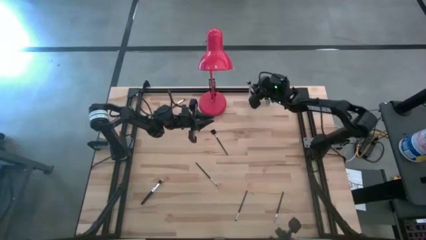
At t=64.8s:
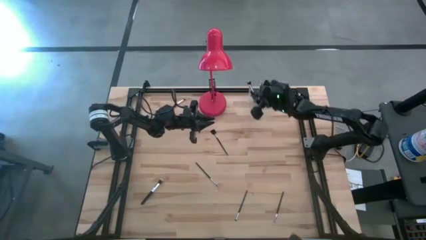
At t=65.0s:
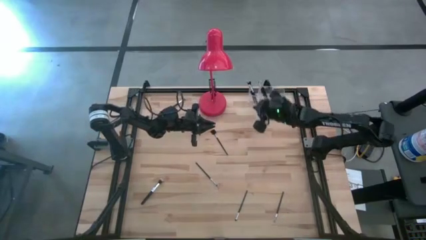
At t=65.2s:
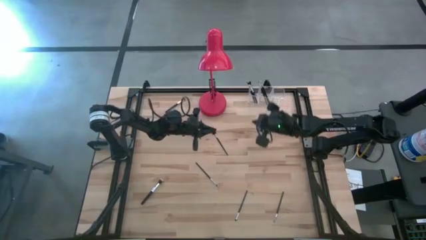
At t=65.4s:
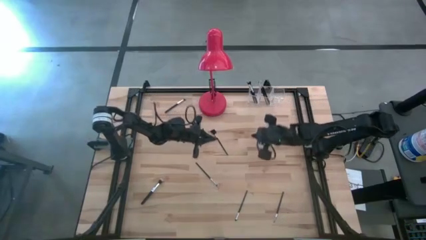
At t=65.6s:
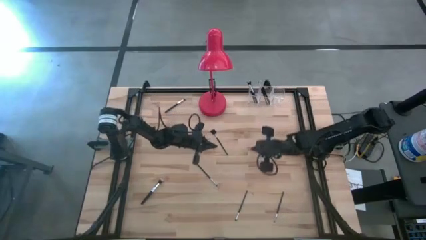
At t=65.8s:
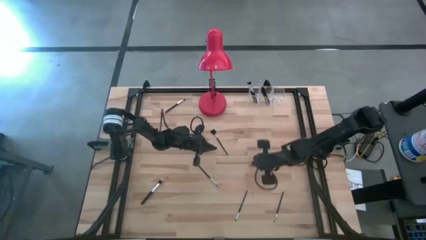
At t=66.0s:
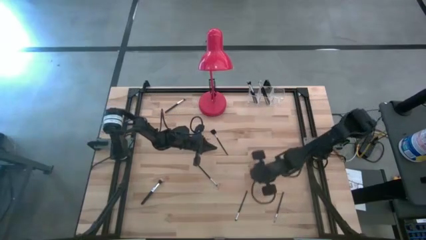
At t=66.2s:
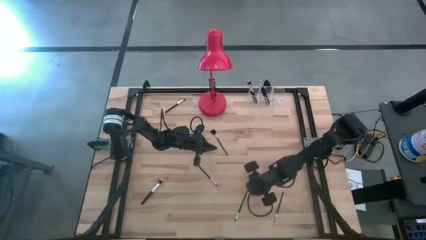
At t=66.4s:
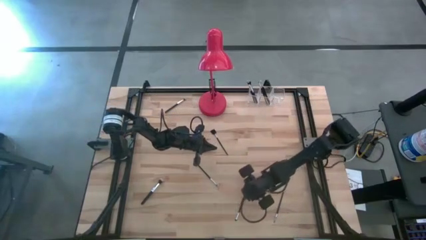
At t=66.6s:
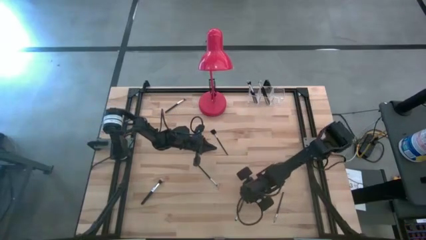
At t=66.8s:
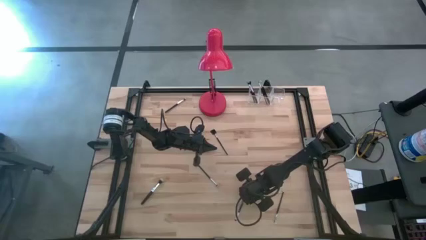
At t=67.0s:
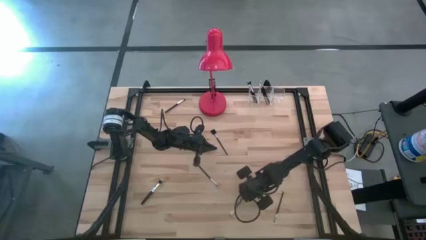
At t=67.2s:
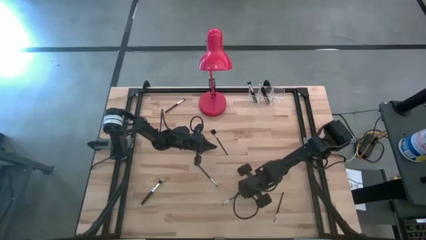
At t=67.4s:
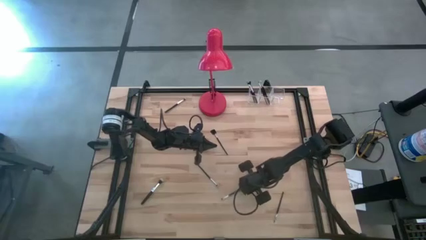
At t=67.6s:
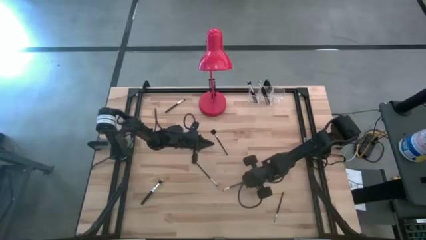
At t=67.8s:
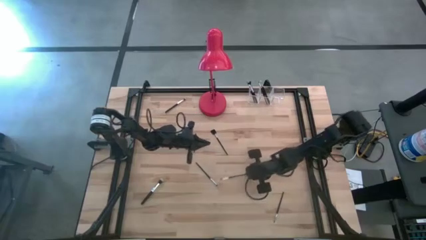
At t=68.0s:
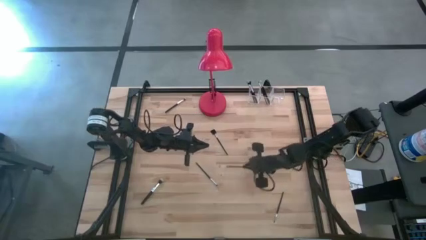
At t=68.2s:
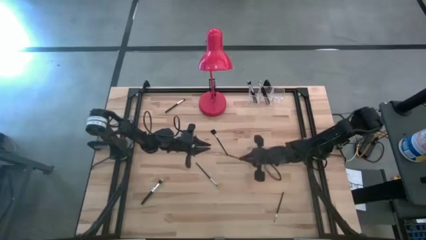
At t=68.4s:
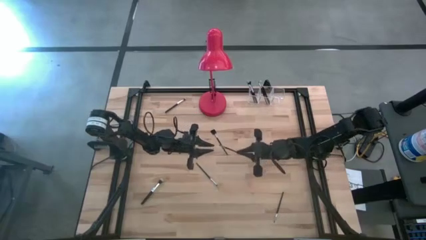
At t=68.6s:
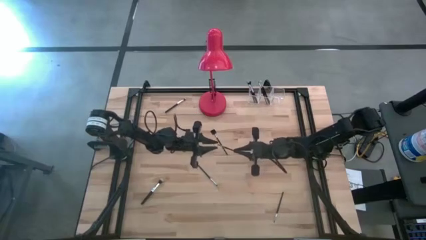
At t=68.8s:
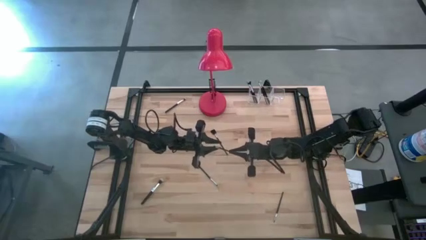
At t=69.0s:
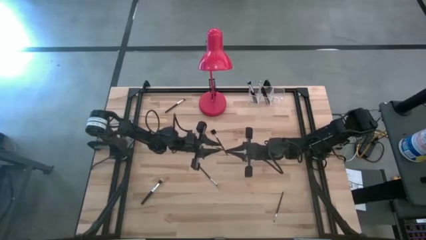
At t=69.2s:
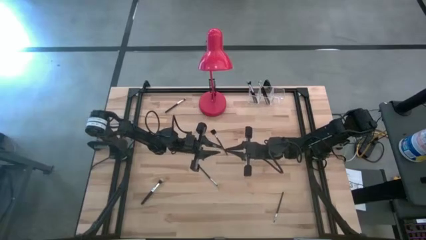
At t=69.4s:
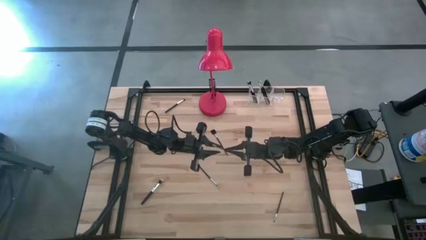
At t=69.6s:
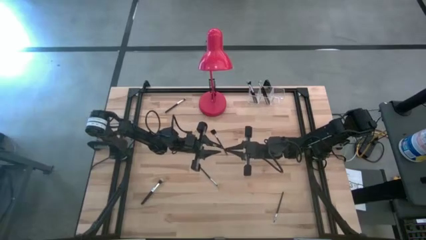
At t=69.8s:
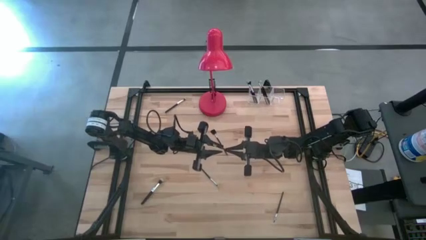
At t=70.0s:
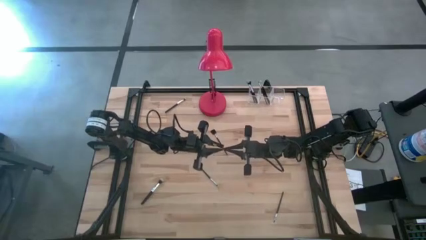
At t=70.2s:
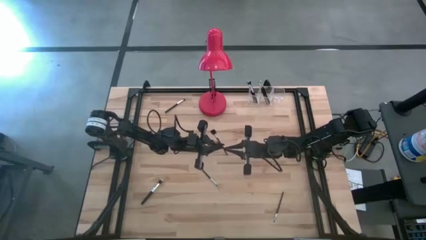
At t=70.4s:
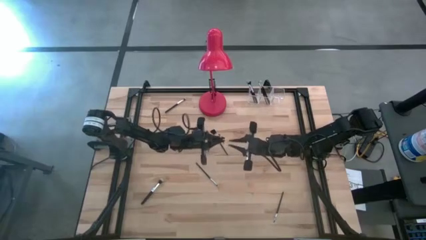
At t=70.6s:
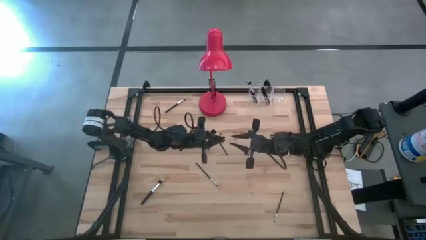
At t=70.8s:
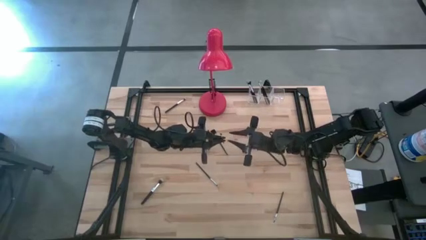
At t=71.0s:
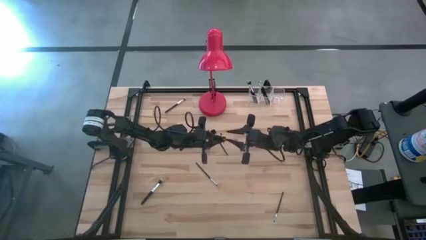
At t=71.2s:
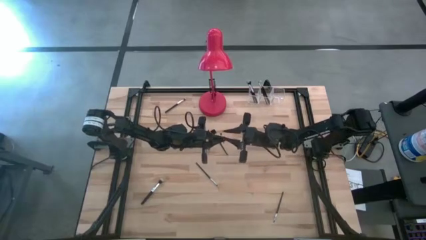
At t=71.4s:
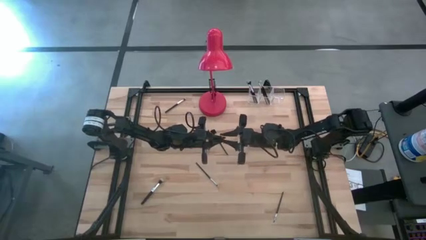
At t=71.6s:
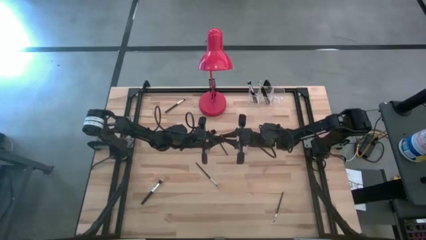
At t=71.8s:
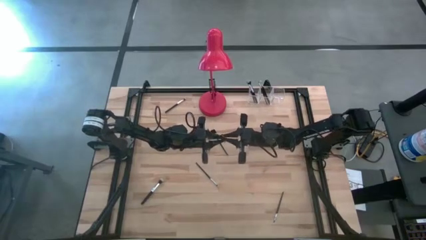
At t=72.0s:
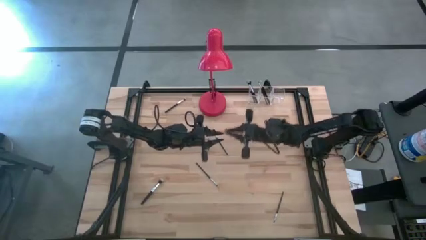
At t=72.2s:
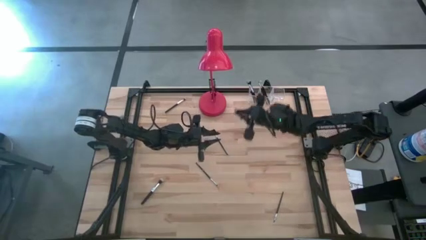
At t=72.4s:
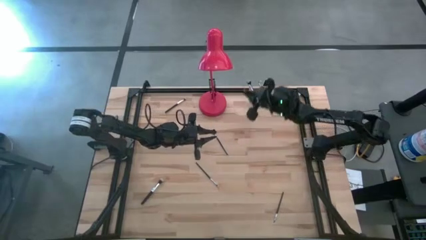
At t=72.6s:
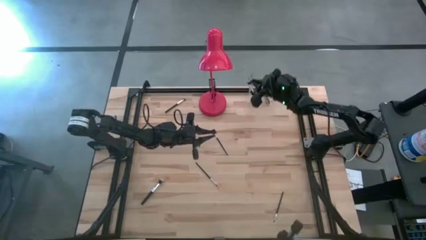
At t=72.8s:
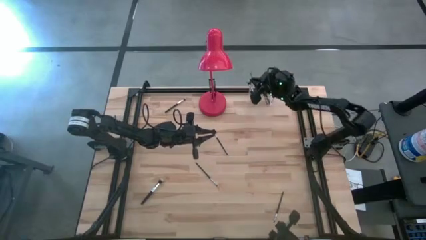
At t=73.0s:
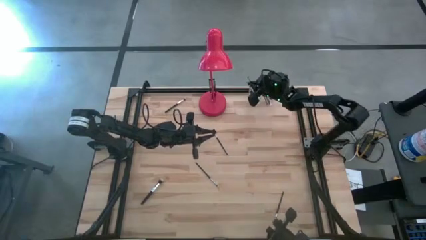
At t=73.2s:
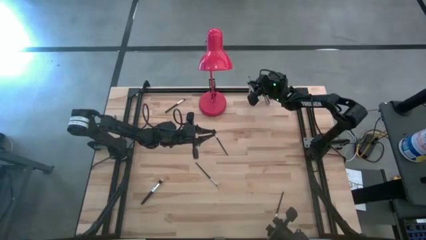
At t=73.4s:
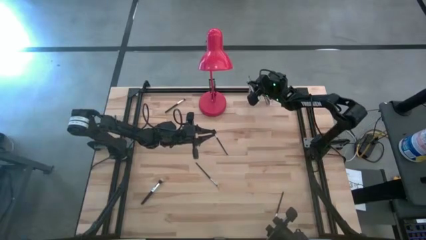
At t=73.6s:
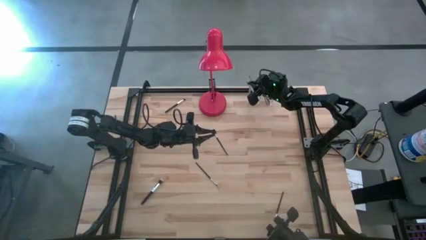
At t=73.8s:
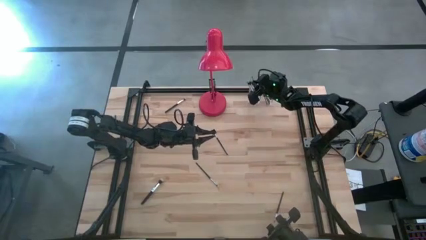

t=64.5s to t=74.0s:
Task: Sort items
Put the black eyeshadow brush into the transparent organizer

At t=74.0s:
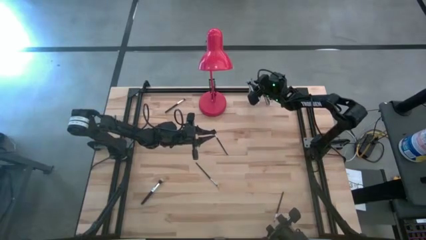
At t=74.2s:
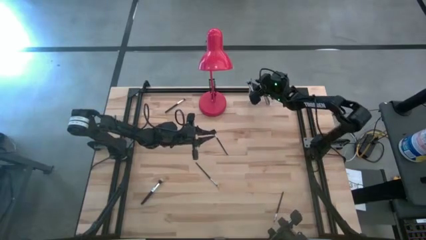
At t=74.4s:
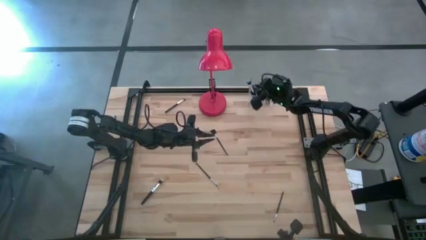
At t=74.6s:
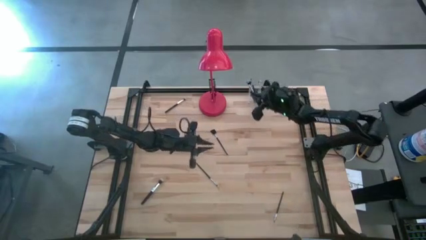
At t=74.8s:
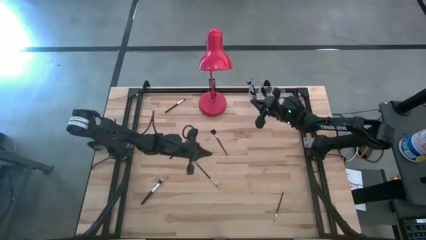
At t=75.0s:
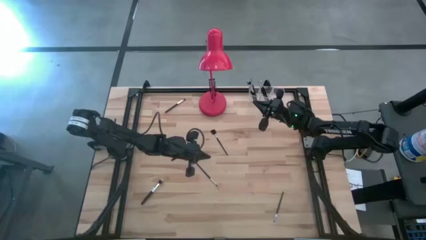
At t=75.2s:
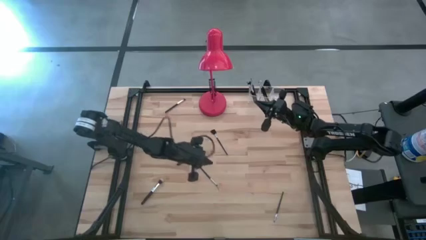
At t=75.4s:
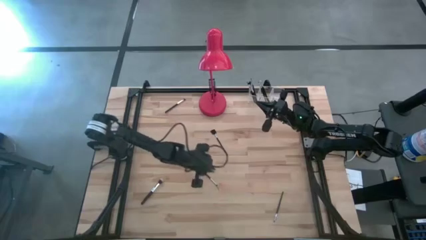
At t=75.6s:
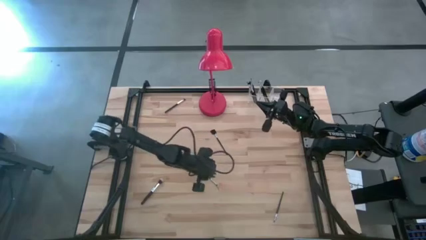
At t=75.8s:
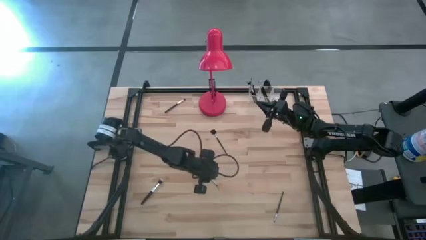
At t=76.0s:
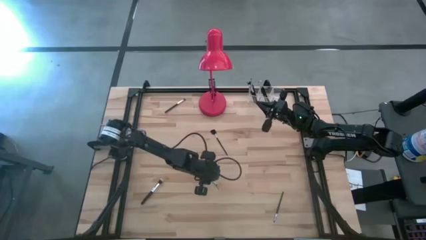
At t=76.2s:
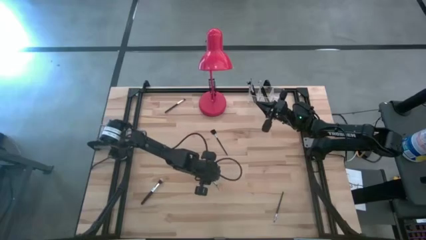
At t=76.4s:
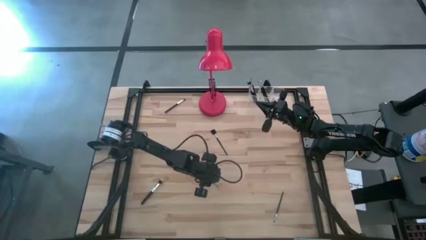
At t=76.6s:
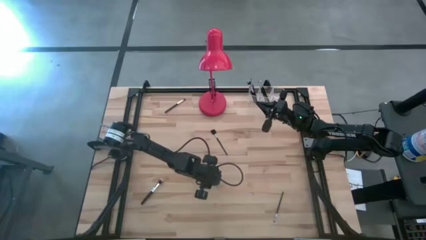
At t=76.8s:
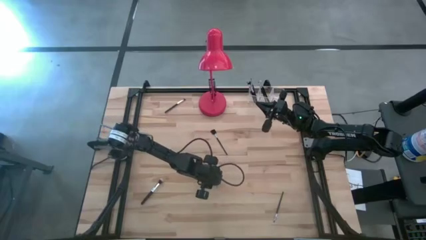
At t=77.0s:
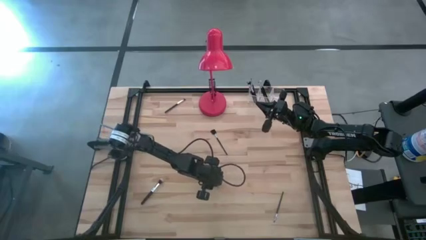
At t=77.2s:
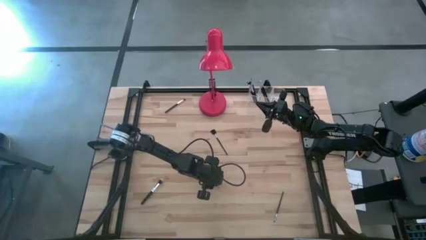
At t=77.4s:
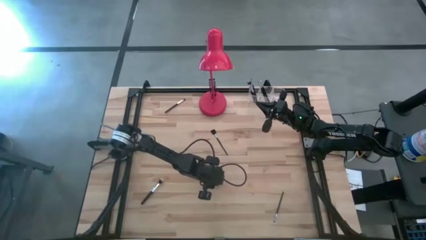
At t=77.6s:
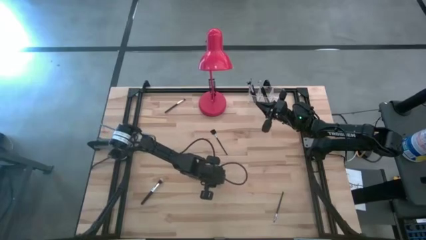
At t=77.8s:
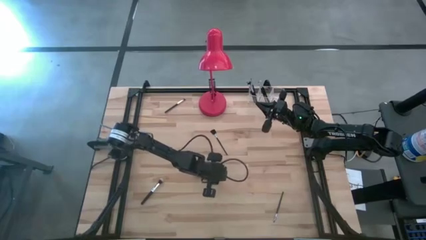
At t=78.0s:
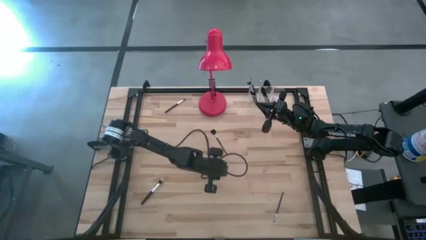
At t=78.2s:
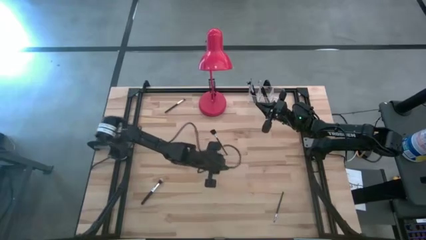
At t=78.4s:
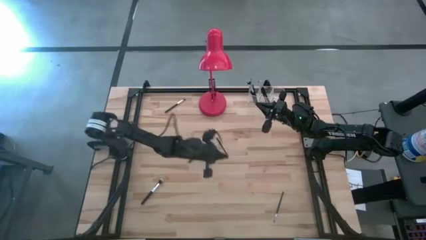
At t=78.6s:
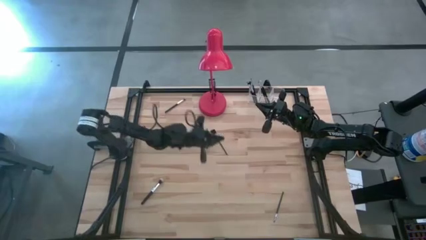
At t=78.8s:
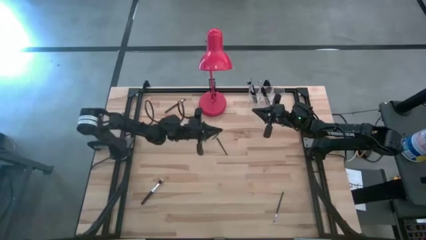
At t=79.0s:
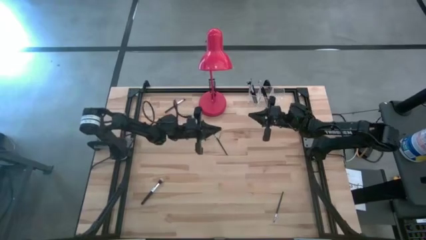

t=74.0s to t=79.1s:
Put the black foundation brush into the transparent organizer
